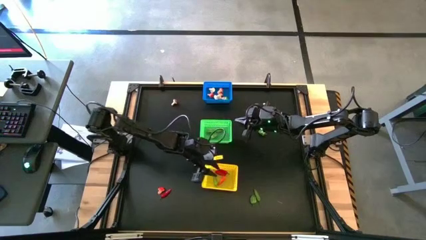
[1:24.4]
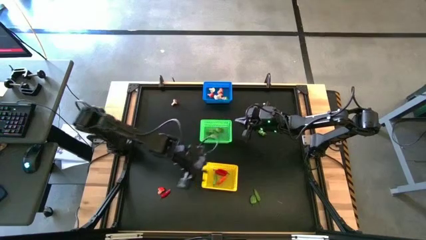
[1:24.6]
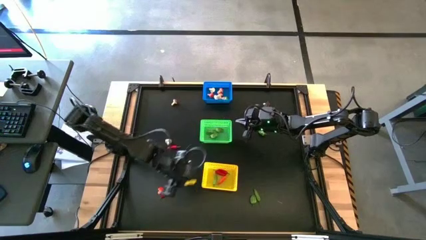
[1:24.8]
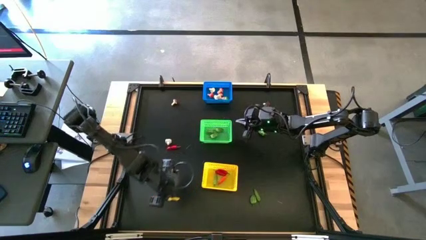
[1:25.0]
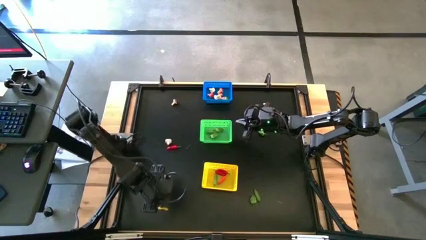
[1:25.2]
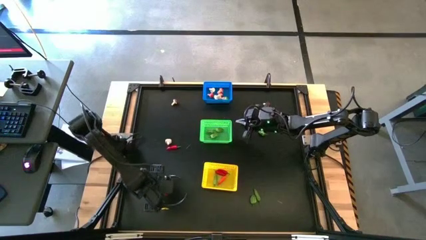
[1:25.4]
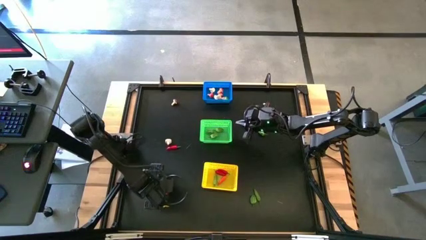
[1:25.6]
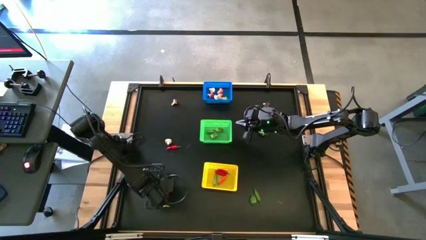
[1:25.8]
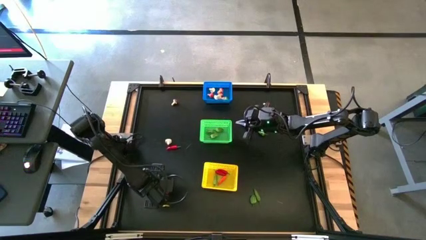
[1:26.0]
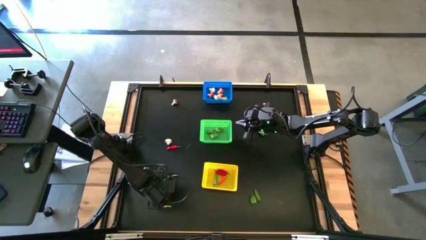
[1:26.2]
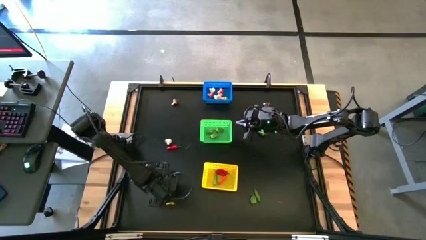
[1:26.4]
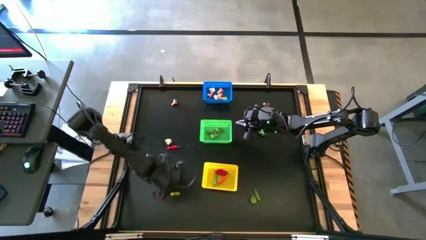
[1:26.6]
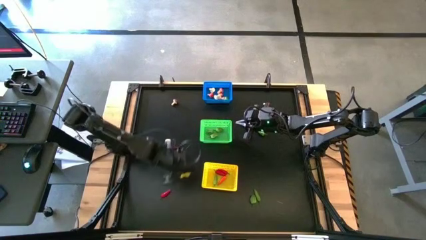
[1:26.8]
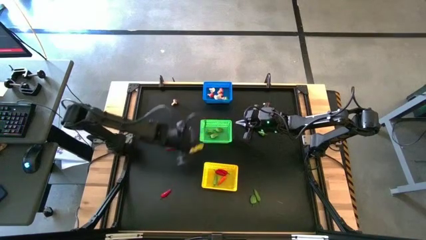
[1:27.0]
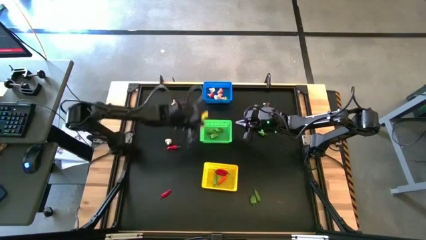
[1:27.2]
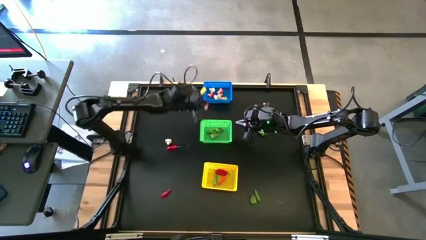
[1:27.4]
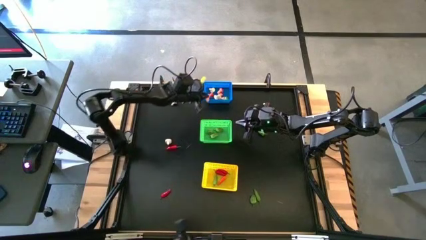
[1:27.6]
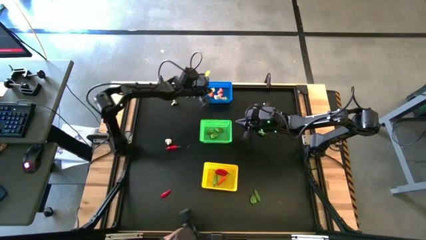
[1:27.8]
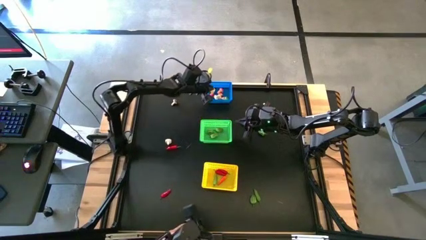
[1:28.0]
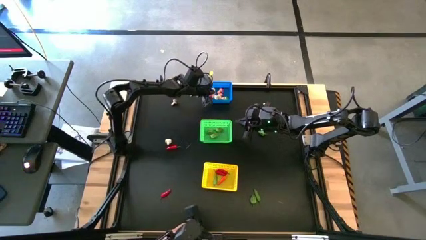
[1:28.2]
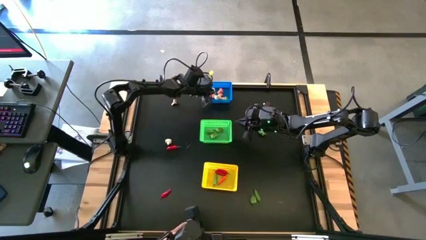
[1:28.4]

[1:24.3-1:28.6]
Task: Sort produce into baskets
Put the red mushroom into the blue bin

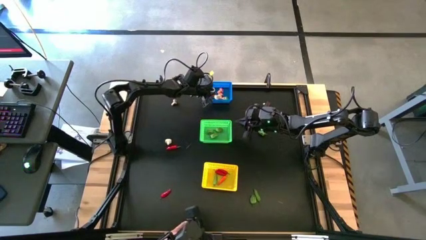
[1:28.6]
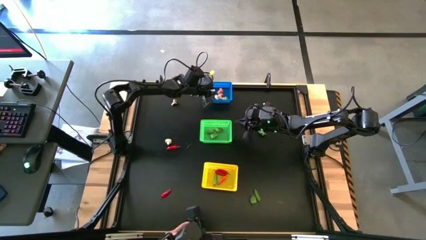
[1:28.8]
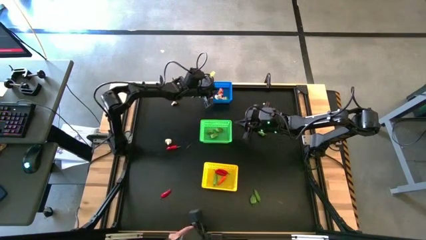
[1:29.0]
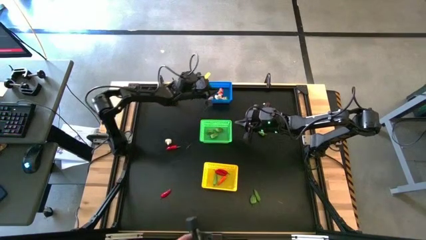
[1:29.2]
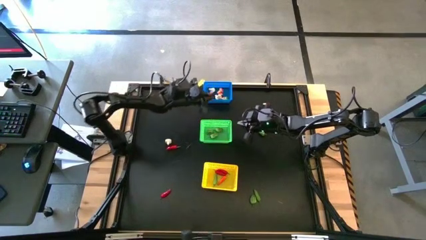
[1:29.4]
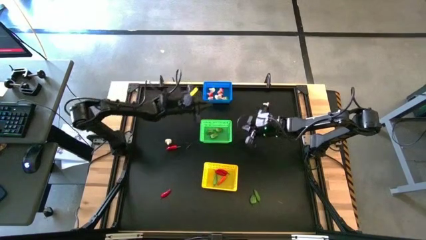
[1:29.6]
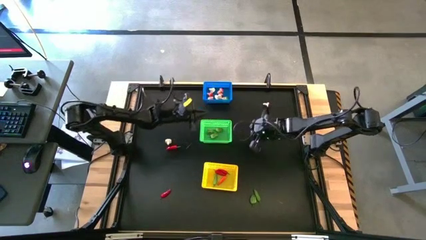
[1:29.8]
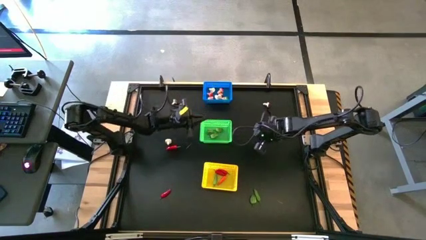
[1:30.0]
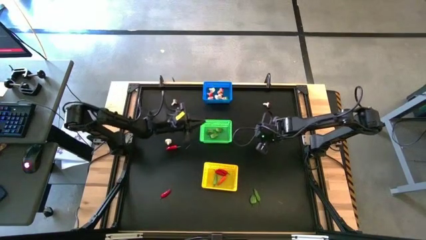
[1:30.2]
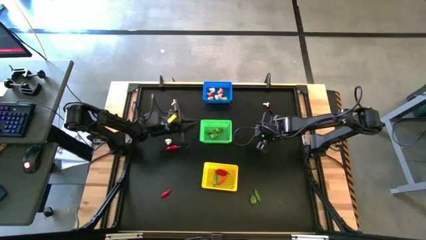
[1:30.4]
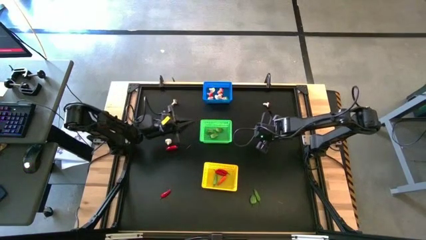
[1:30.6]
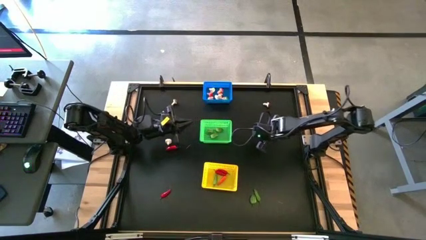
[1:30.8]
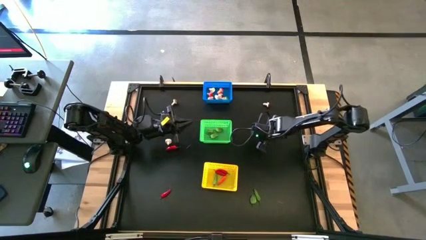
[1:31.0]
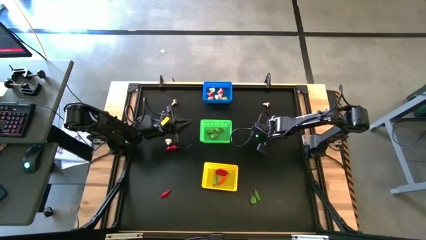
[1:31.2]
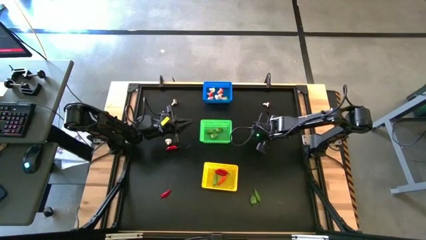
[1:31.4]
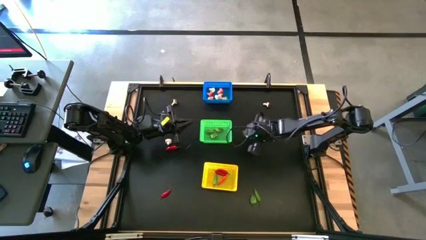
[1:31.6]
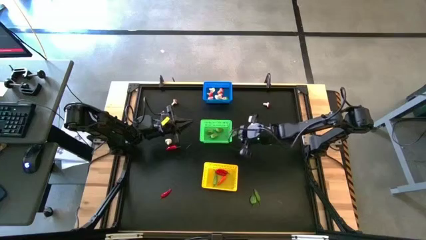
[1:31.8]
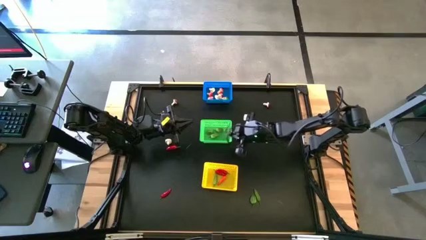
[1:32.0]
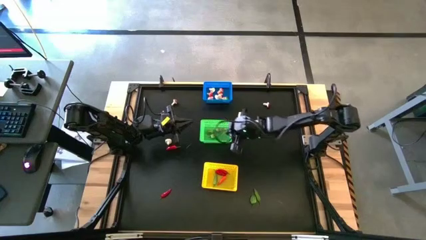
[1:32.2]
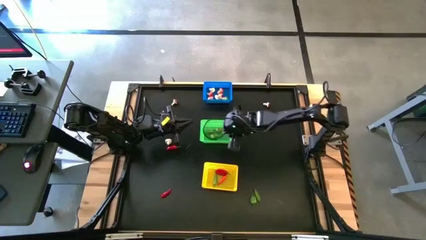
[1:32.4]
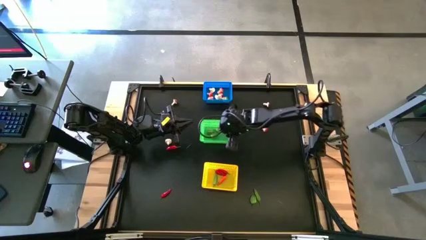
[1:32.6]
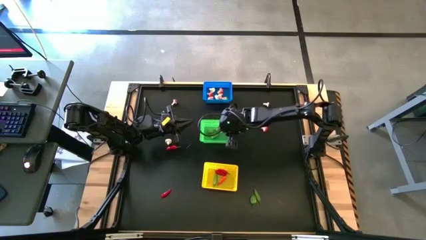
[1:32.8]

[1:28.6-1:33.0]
Put the green chili pepper into the green bin

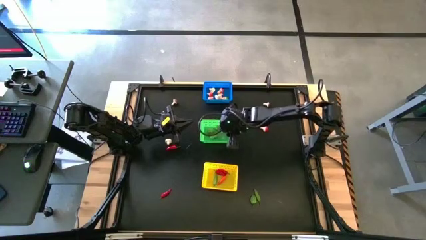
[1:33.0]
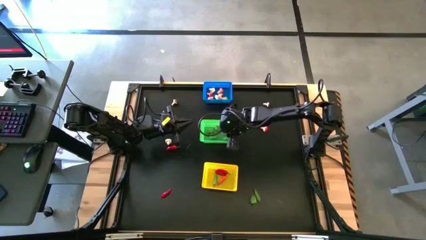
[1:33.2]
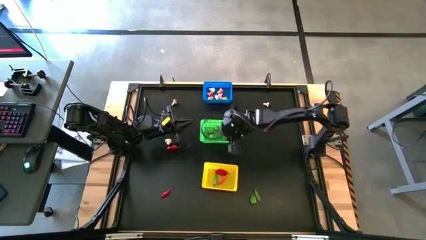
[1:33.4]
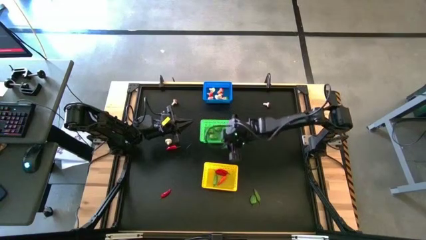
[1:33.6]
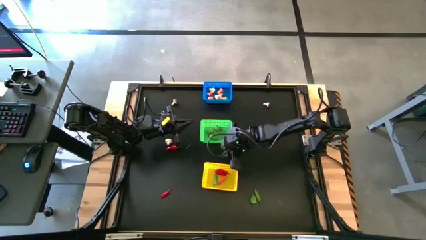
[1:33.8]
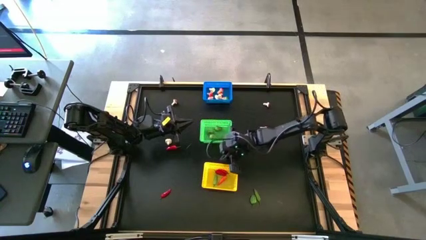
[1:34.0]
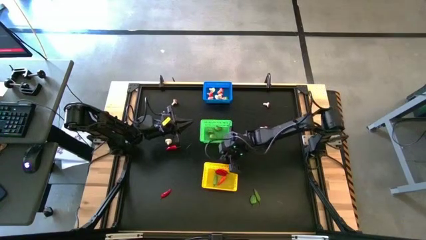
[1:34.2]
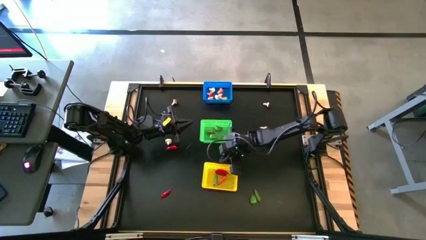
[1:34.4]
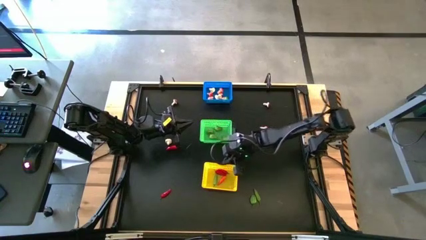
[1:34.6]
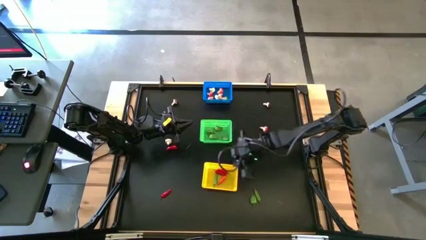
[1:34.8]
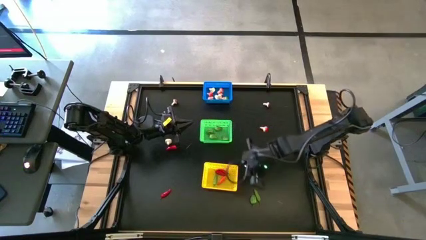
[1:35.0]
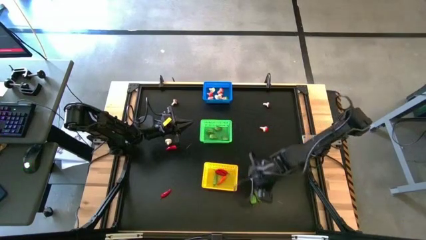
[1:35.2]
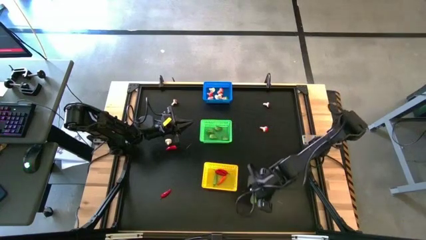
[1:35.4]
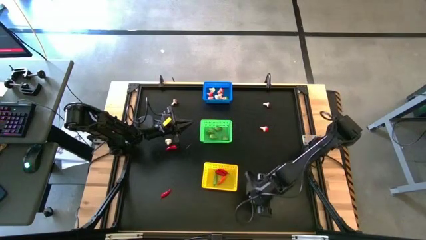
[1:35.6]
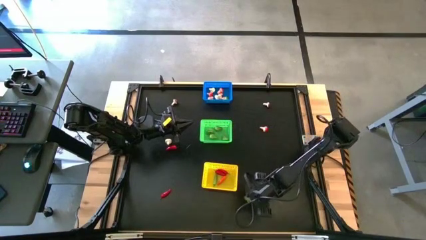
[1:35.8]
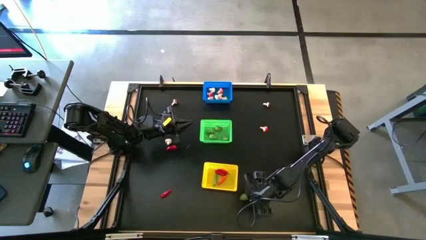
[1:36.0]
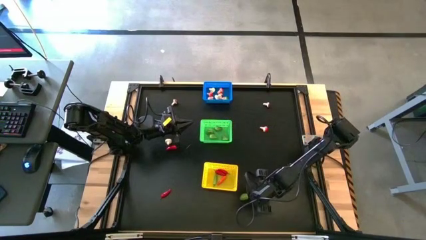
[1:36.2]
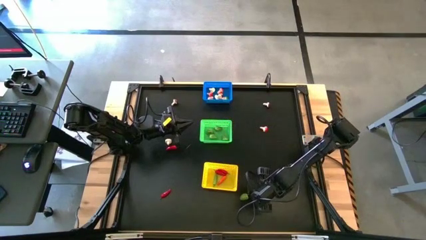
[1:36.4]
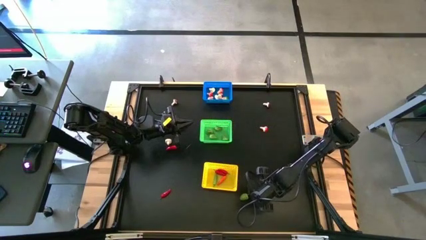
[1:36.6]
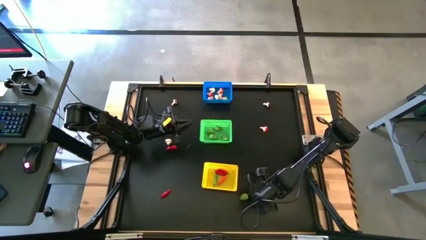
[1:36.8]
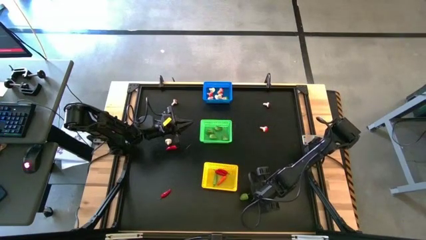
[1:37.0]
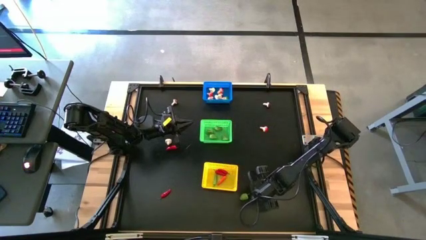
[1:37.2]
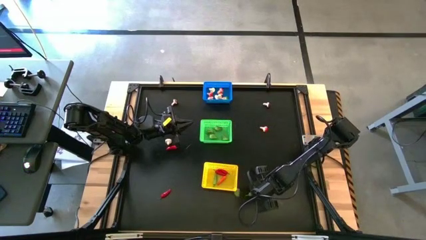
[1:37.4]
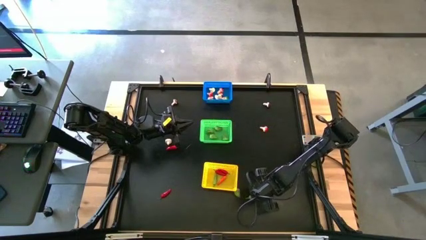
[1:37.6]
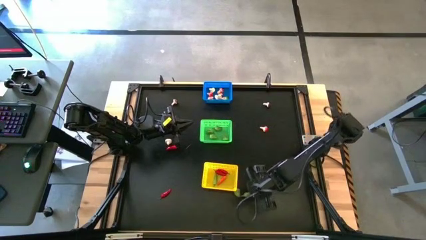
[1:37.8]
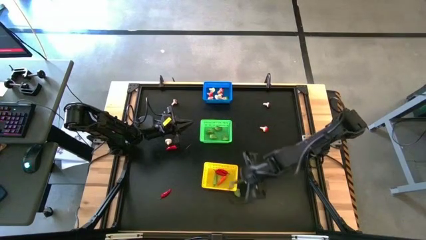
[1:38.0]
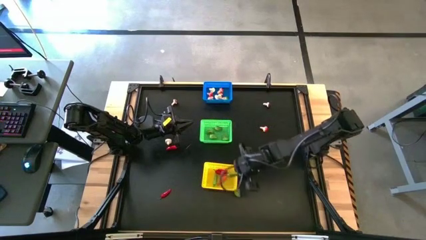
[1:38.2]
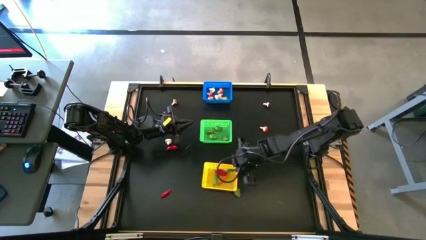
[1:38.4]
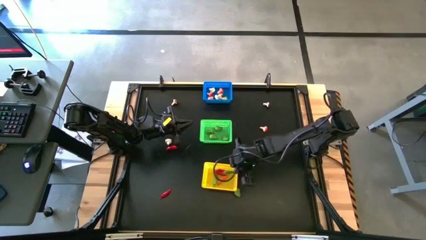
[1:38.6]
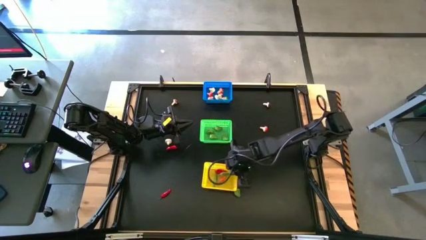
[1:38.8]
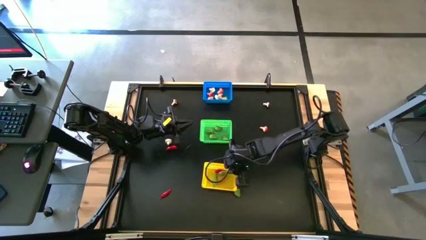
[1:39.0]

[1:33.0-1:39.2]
Put the green chili pepper into the yellow bin

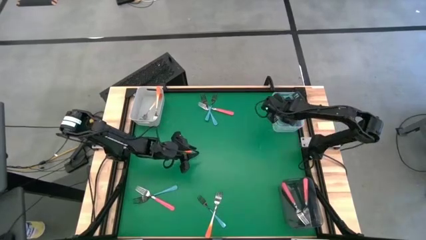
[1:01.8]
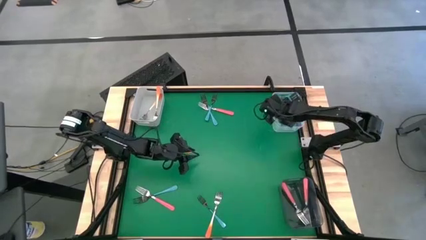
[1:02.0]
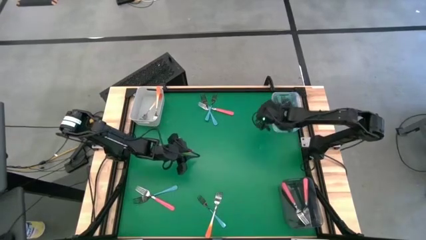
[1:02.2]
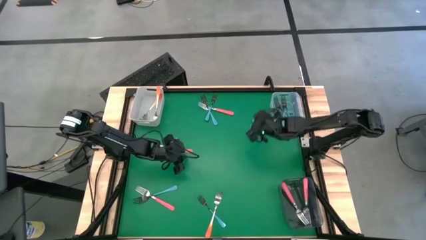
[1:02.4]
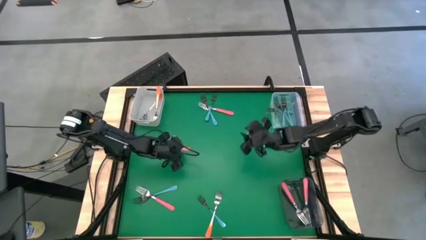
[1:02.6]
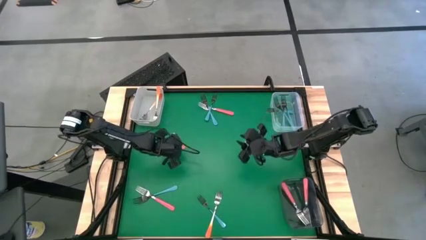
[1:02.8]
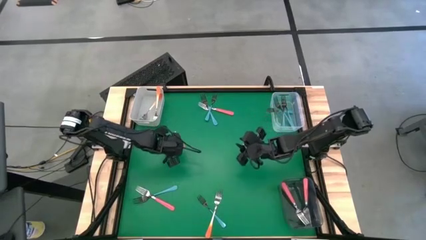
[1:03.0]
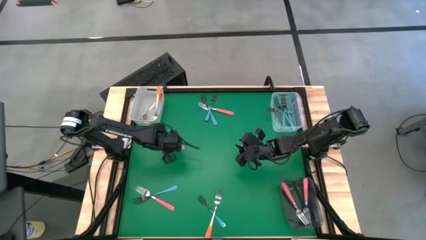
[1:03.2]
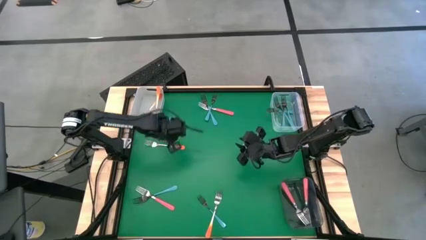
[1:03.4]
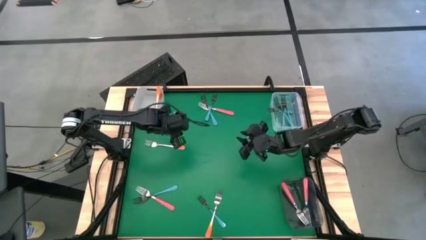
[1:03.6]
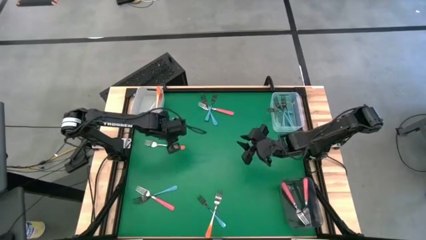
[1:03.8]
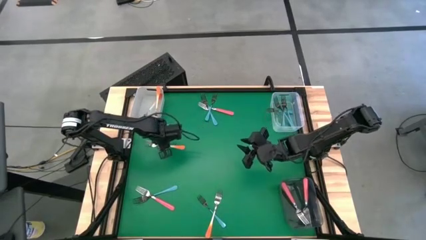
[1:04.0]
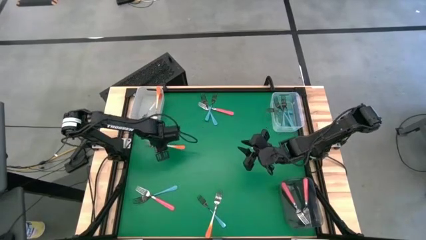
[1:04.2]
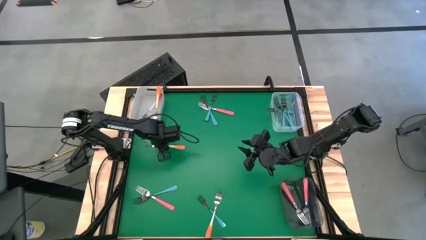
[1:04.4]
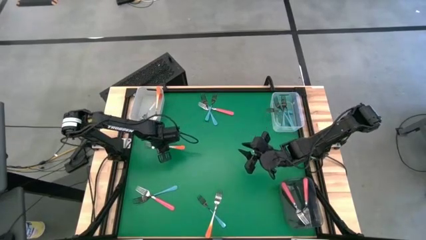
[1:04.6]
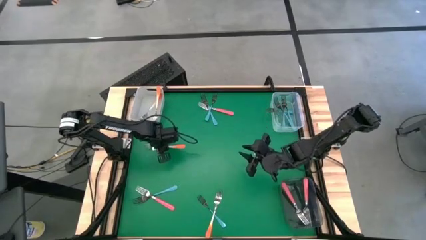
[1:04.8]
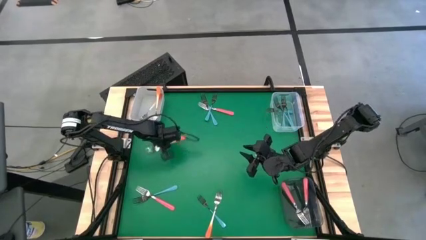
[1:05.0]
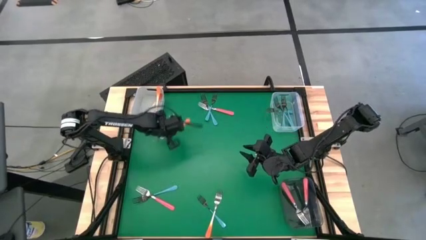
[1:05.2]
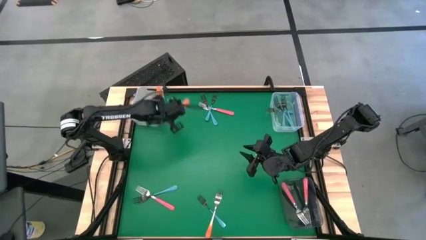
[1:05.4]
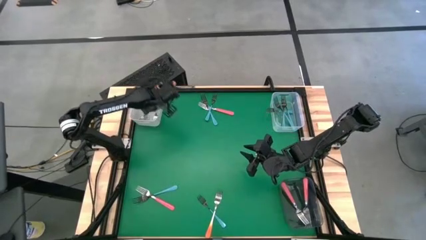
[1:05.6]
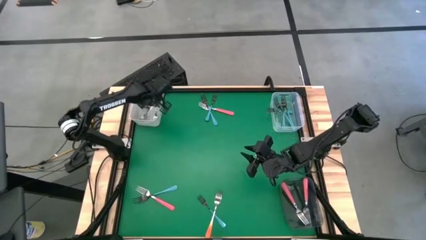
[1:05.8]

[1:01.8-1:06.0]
Task: Sort silverware by color (type)
Put the orange fork into the white bin
